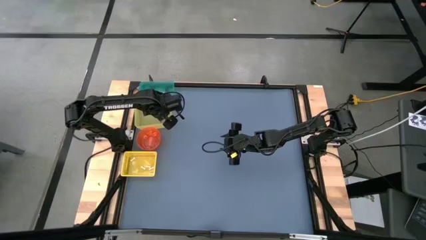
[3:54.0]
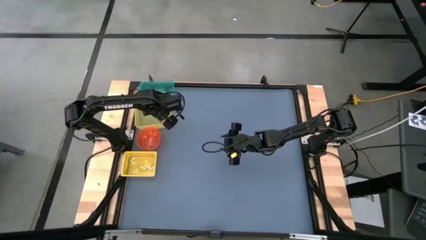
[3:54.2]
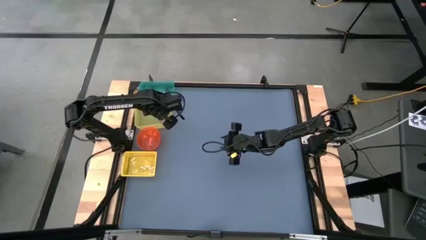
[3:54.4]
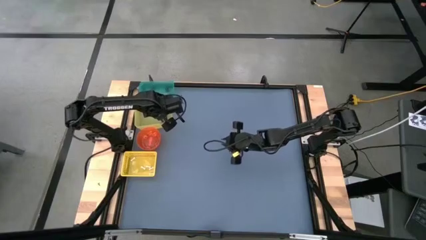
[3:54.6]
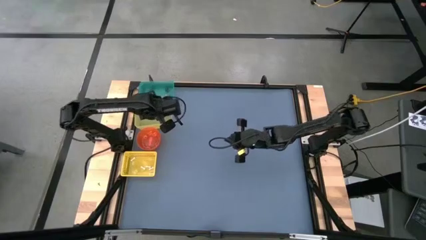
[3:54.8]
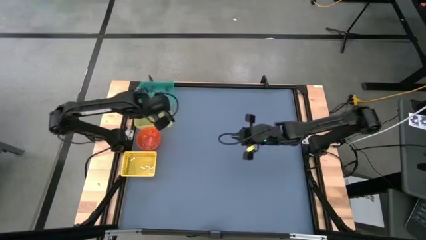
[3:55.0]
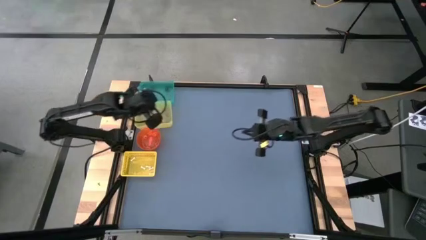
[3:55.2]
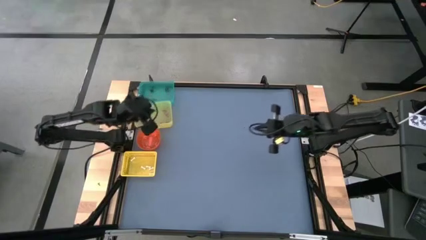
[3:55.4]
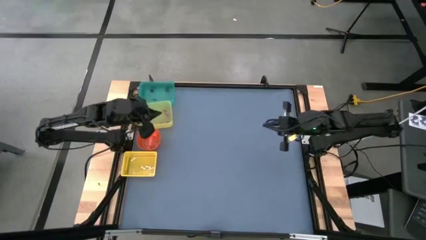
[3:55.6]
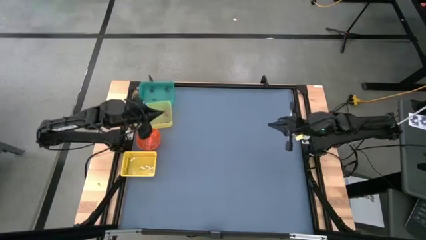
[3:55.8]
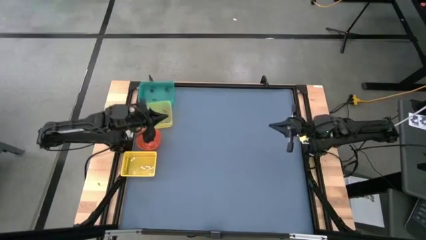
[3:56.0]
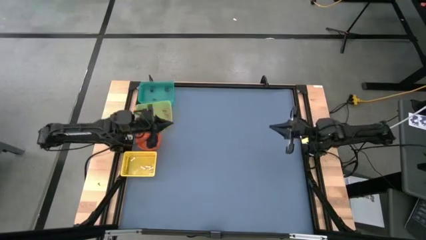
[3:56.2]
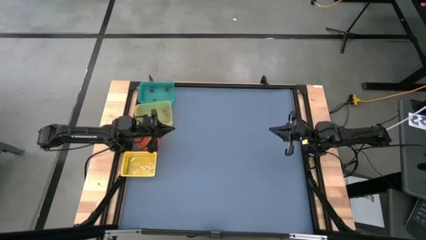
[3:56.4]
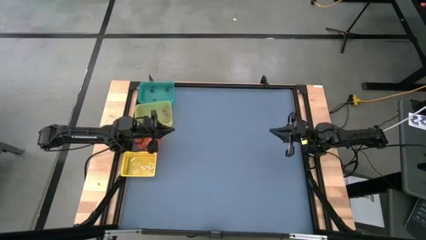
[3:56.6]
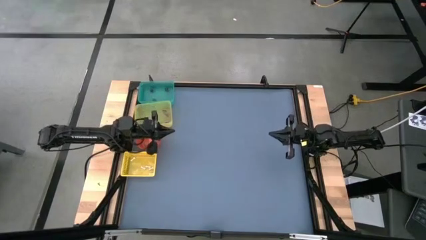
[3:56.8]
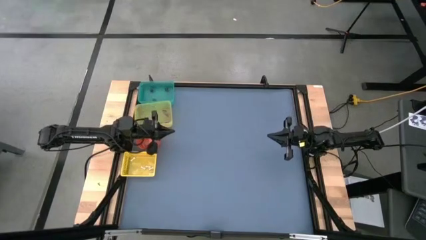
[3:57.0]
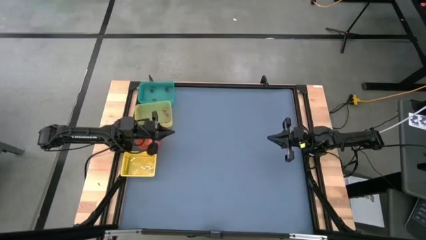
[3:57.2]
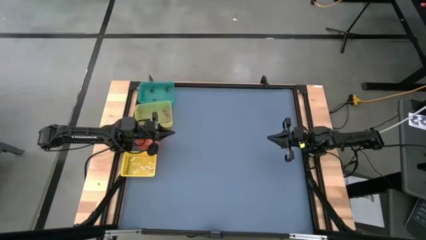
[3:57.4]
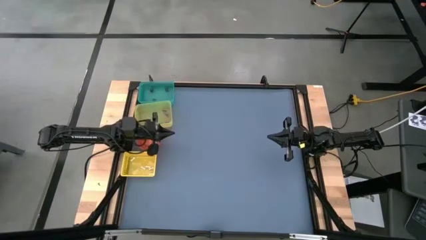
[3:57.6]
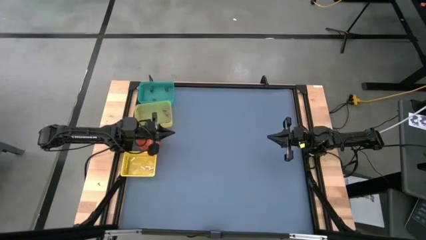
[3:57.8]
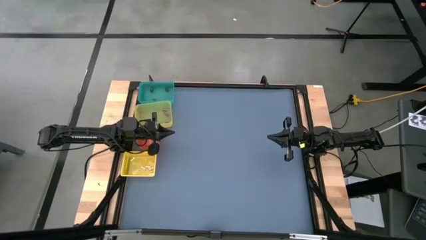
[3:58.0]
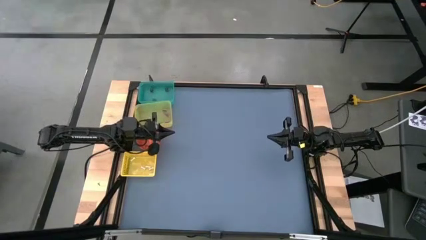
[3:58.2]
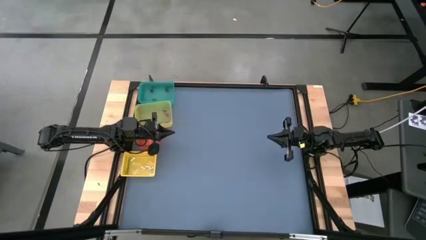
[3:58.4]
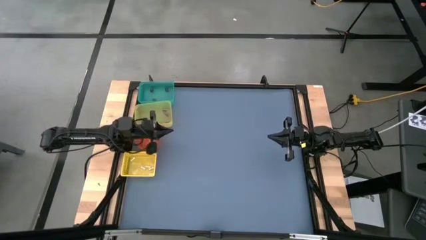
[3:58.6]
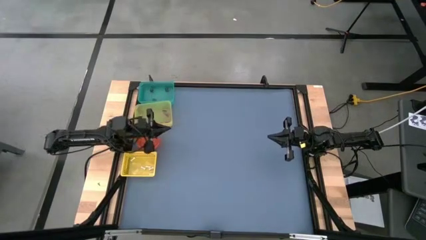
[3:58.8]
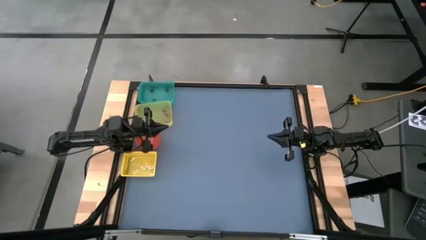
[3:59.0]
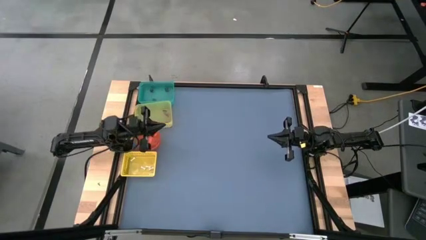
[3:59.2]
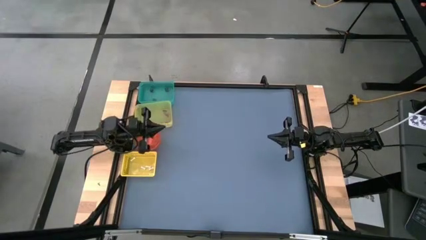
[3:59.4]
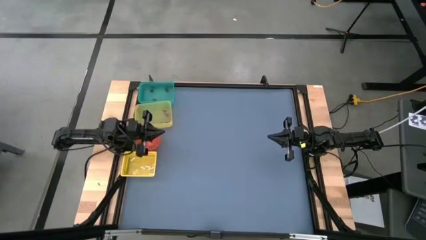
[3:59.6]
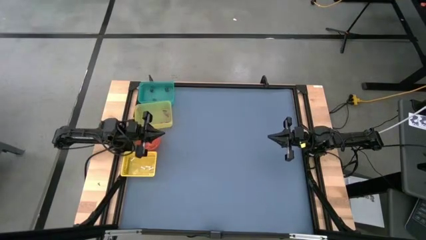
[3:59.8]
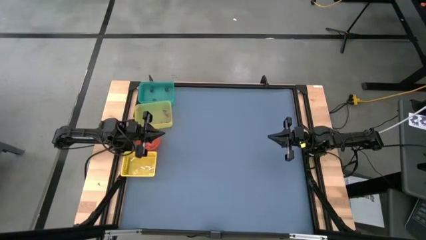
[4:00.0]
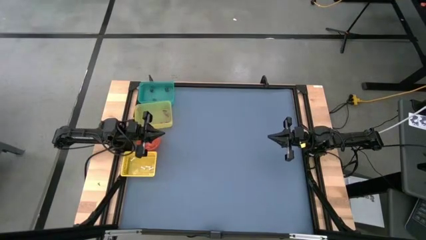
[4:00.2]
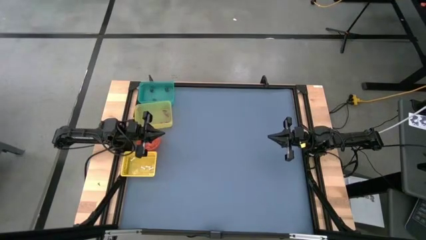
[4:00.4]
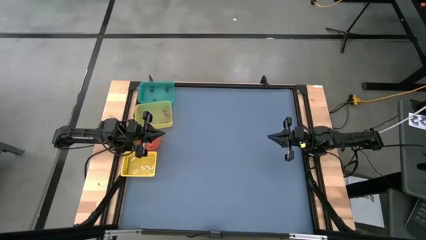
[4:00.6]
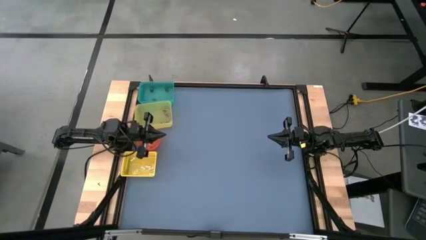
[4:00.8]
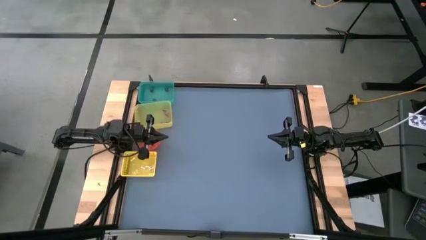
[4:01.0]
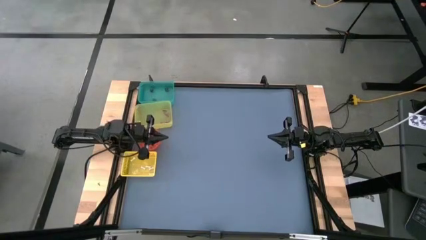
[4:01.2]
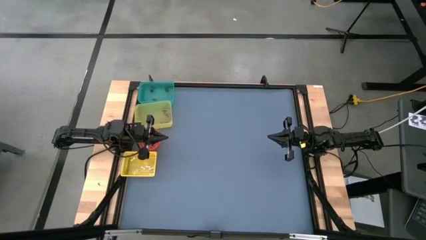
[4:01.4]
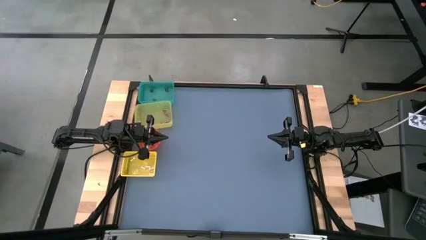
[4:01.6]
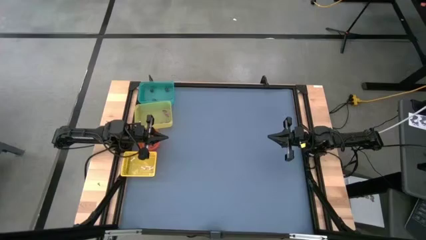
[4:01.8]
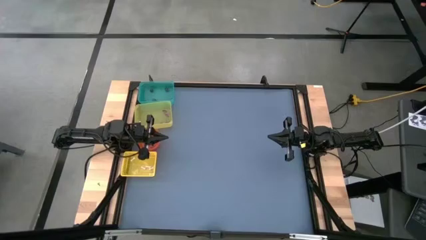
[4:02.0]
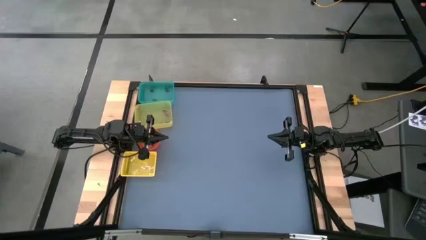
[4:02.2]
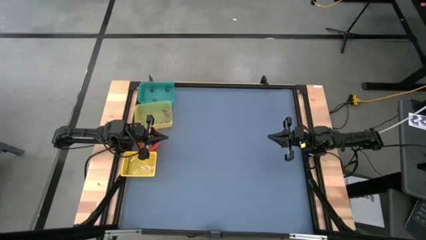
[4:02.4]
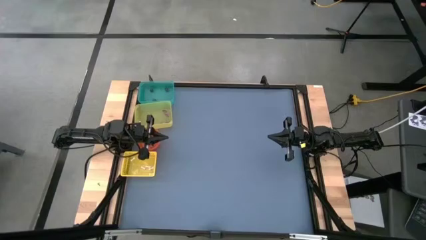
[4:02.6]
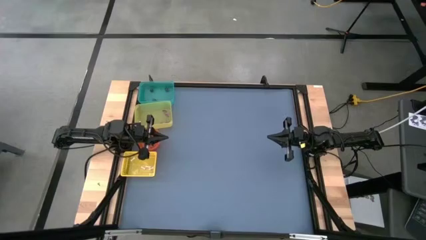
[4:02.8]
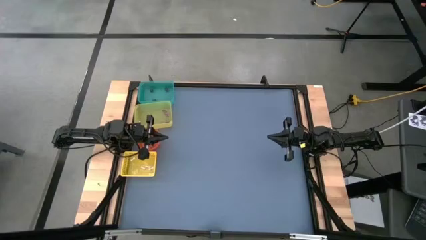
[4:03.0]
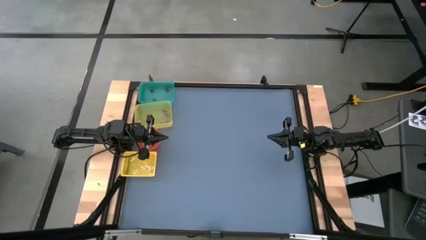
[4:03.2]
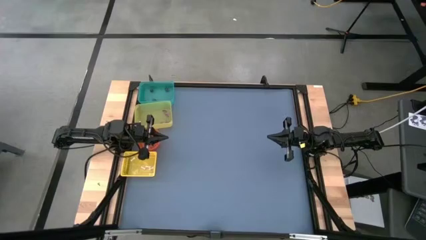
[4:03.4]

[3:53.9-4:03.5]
Task: Sort Halloween decoration
Return to Home Position

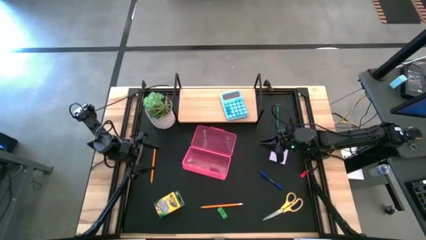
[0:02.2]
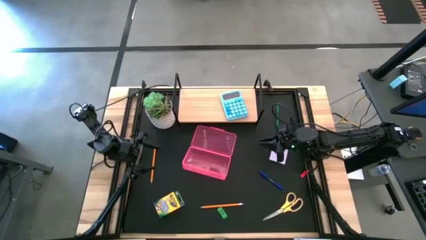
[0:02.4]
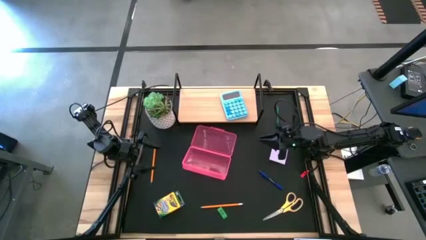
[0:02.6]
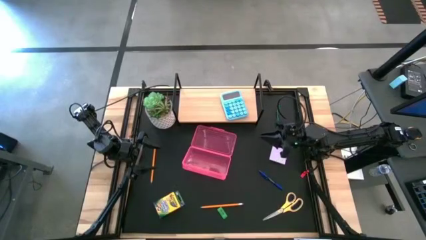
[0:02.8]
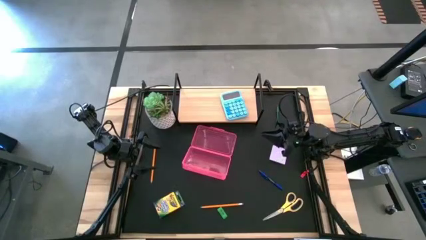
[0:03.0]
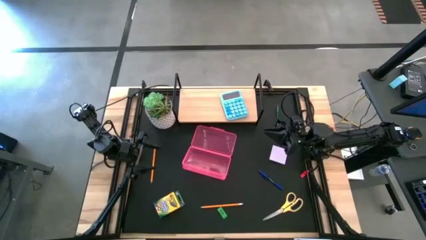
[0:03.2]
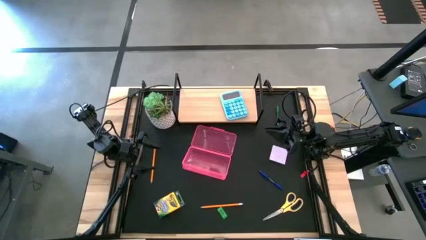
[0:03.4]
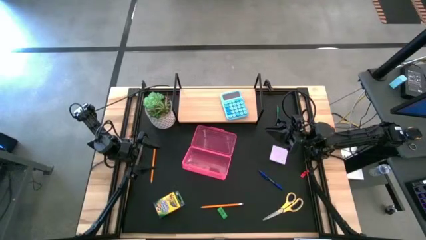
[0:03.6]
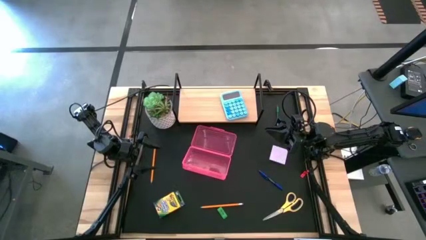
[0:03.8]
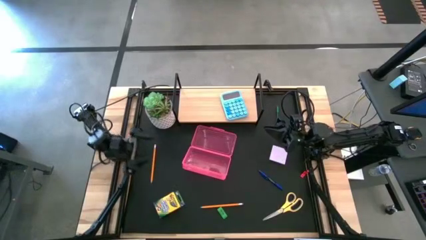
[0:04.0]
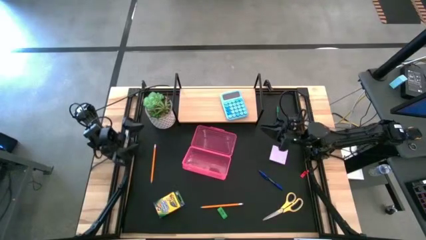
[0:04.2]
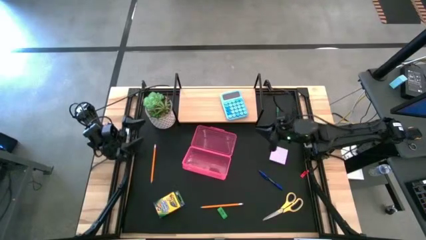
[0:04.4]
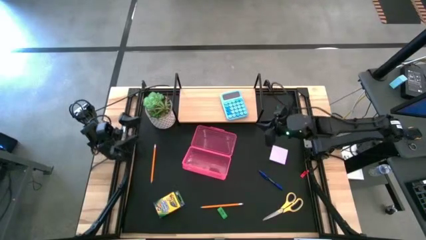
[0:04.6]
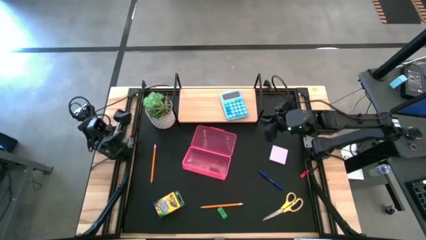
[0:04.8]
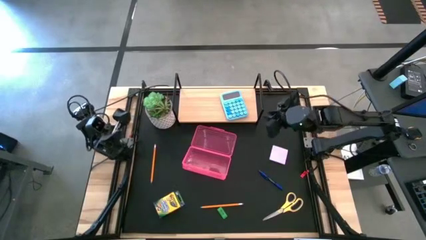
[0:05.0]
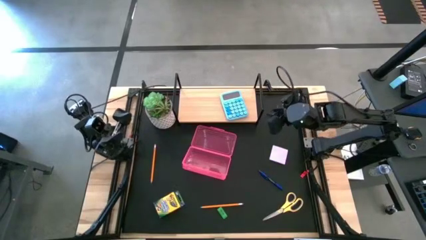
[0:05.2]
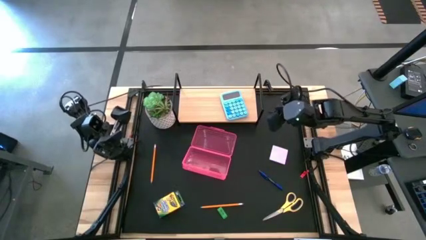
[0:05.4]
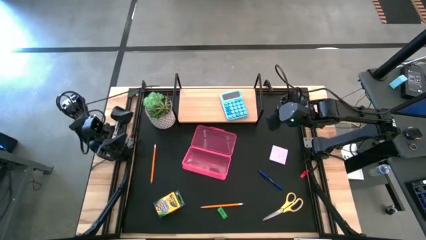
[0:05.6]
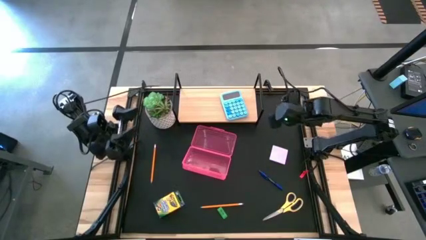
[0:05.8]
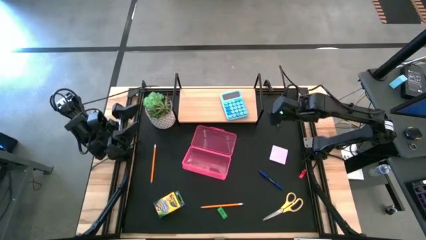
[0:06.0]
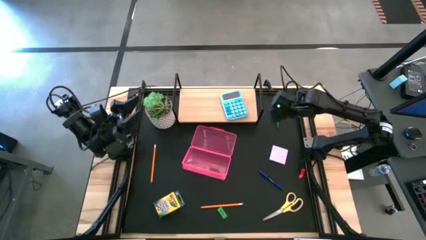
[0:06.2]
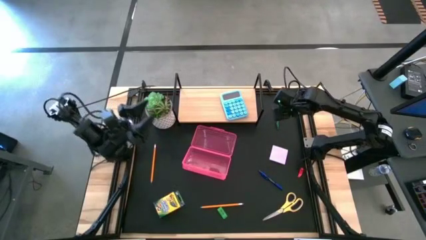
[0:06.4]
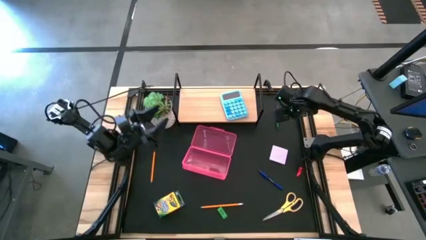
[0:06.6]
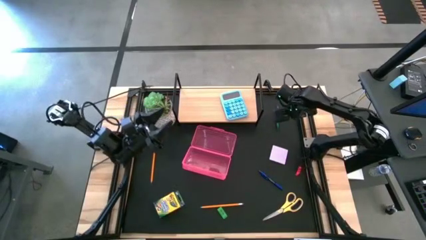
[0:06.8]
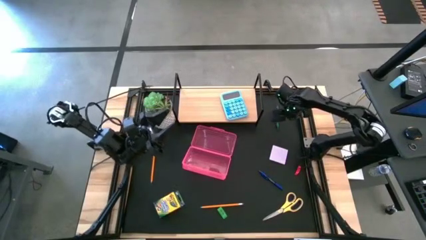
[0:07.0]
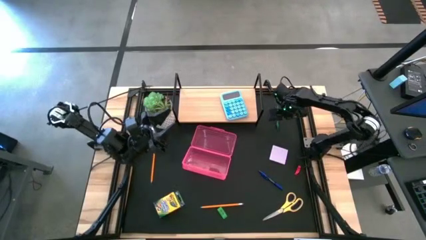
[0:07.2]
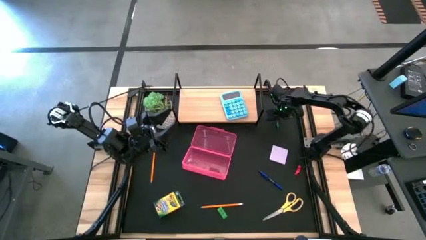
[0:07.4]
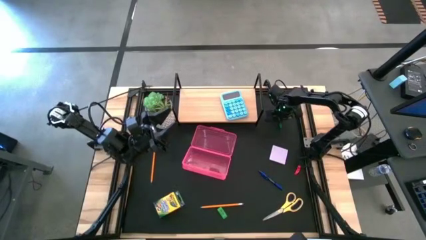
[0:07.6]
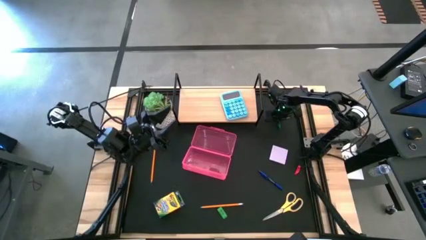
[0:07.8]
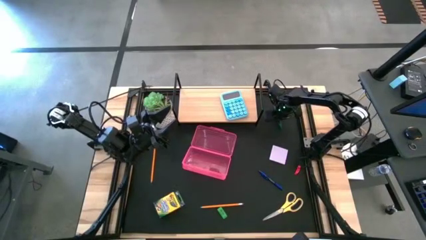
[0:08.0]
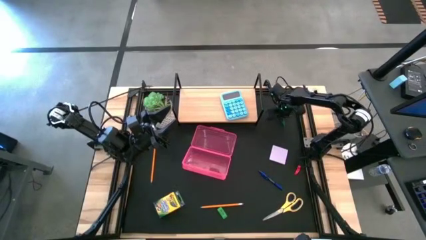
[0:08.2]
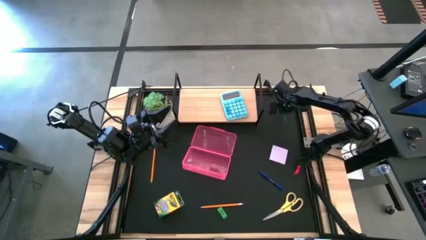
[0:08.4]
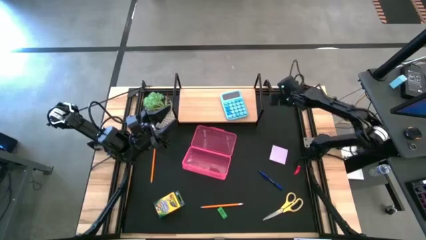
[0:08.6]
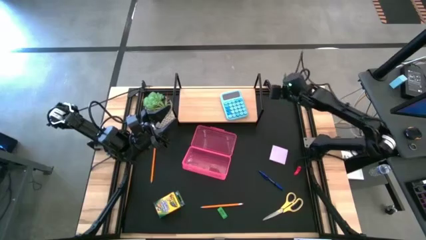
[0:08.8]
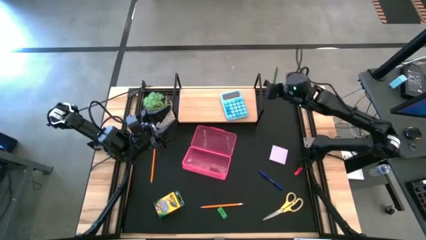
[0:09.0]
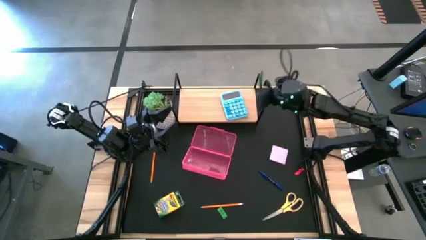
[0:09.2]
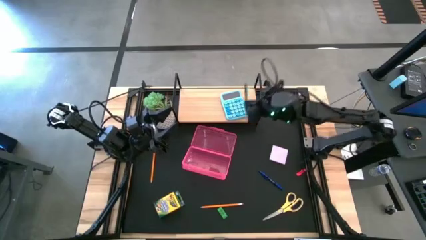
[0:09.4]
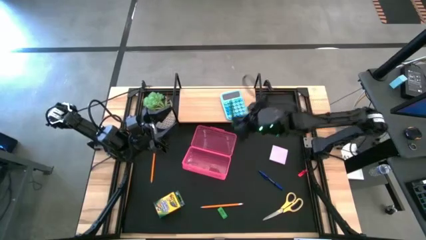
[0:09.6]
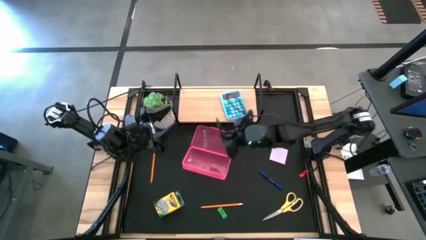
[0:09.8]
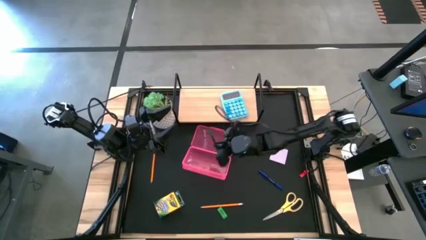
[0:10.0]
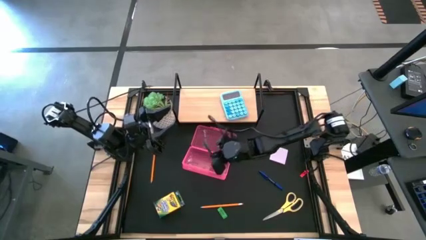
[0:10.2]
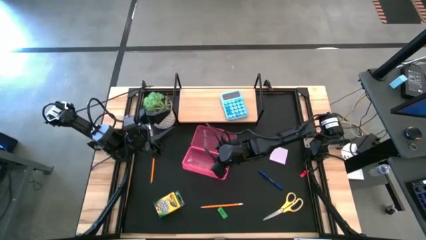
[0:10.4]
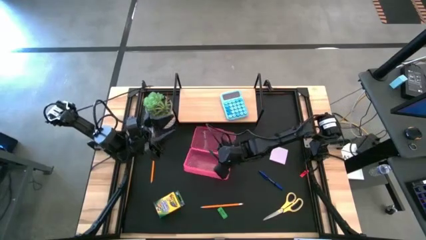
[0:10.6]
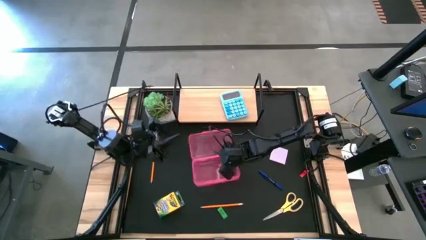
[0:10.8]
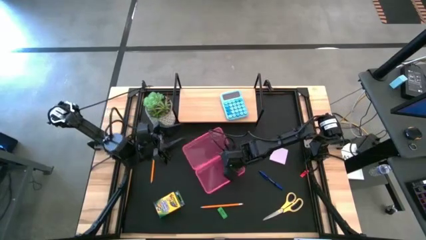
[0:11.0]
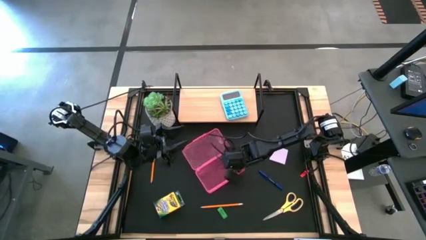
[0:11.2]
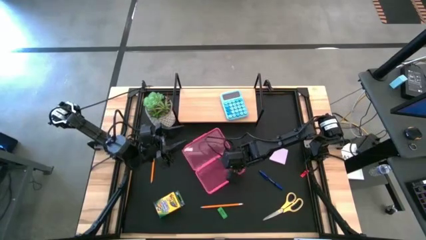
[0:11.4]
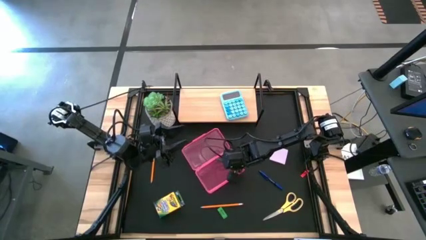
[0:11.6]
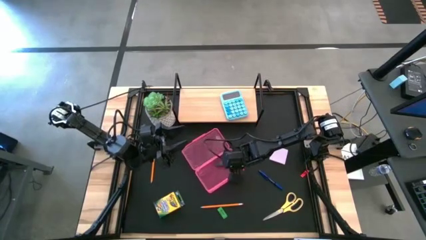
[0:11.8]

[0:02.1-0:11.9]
Task: Pack school essentials
Put the green pen into the red supply box
